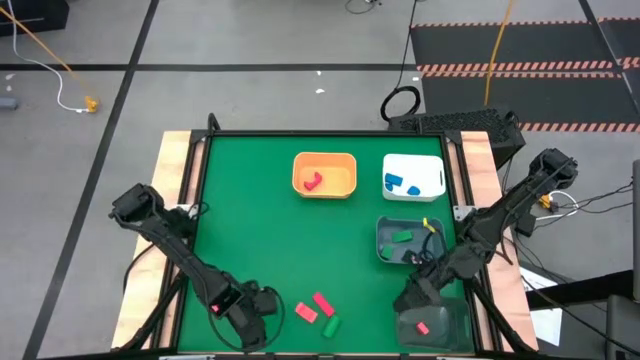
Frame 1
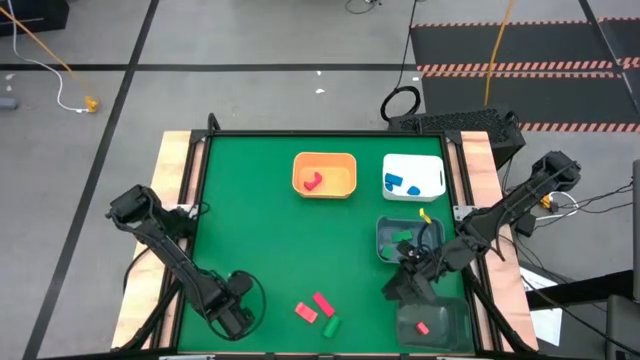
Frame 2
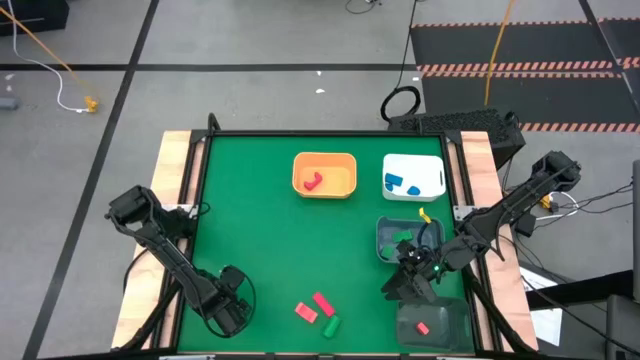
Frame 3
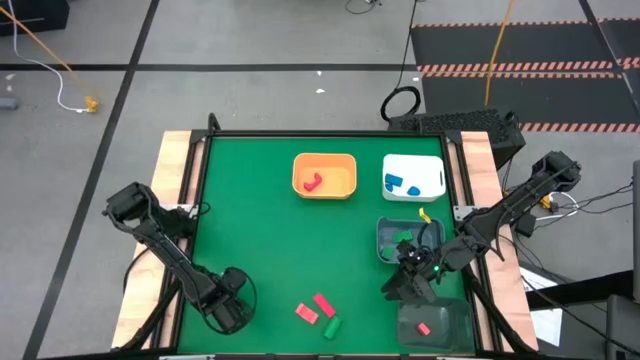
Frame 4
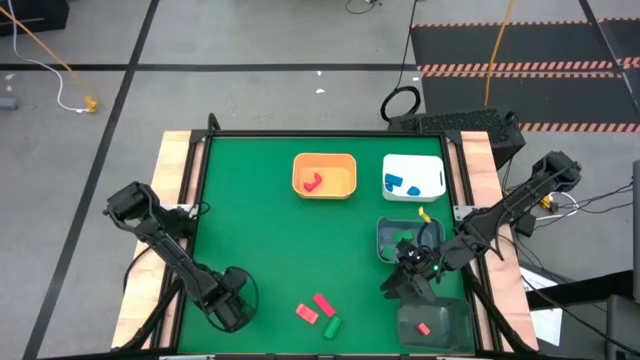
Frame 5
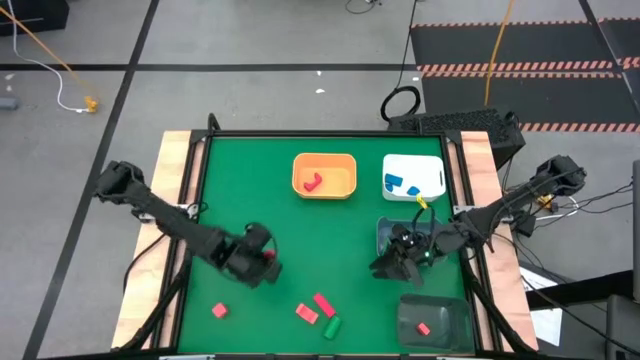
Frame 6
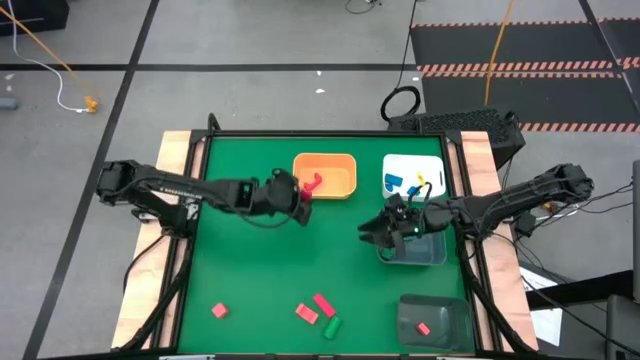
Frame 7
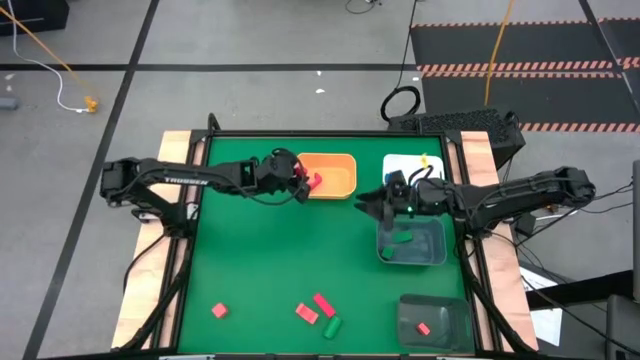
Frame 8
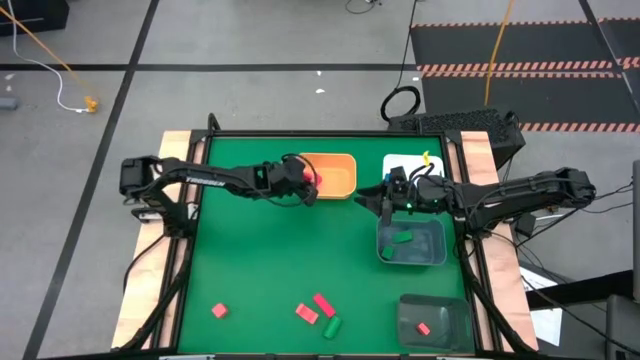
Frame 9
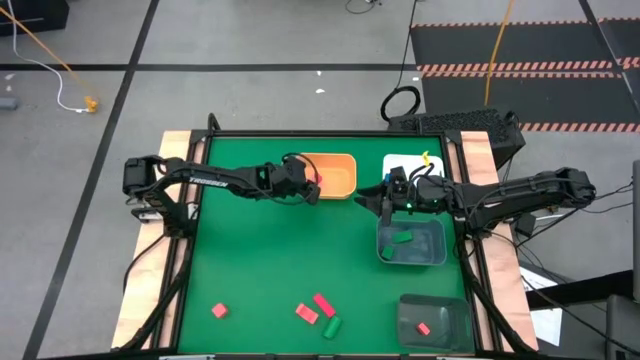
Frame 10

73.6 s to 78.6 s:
Task: Sort & place blocks by color
Put the left red block into the yellow bin

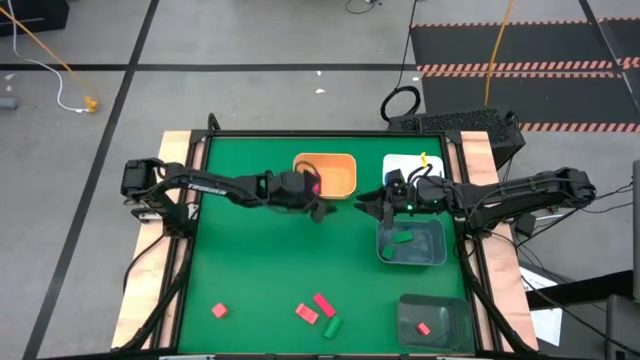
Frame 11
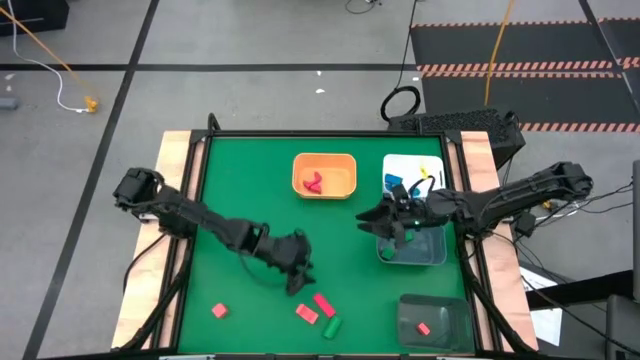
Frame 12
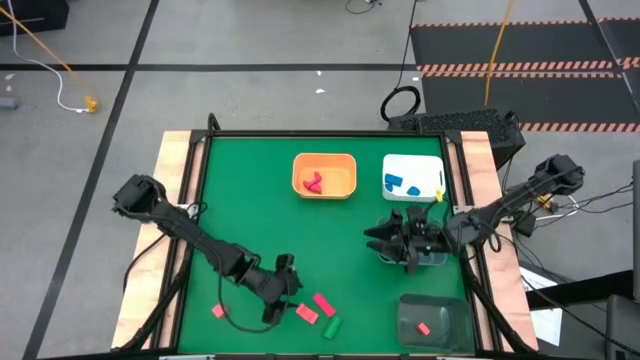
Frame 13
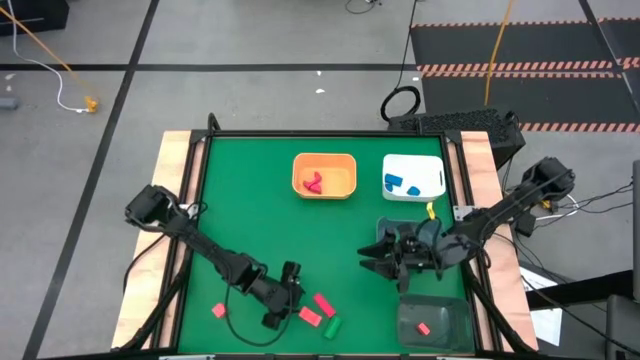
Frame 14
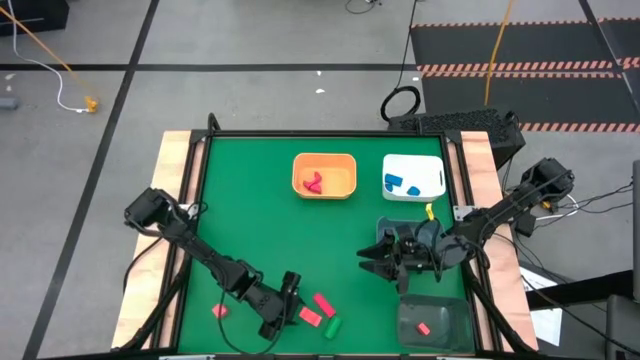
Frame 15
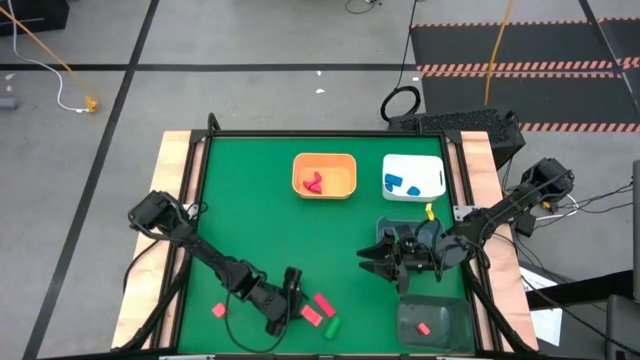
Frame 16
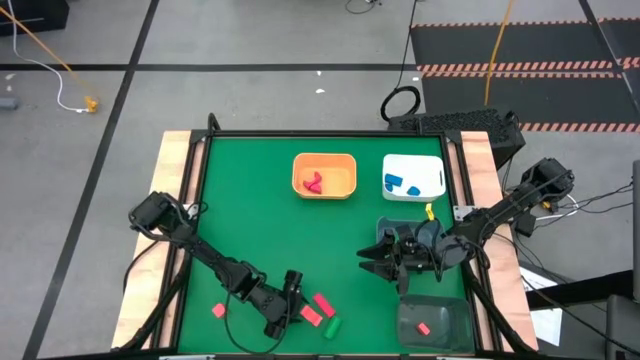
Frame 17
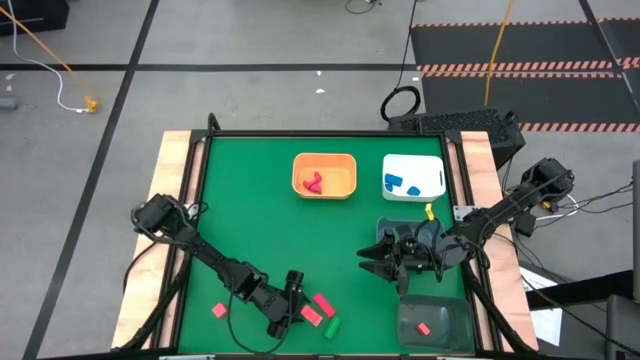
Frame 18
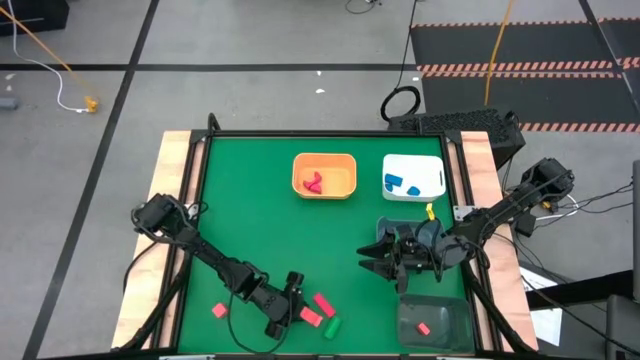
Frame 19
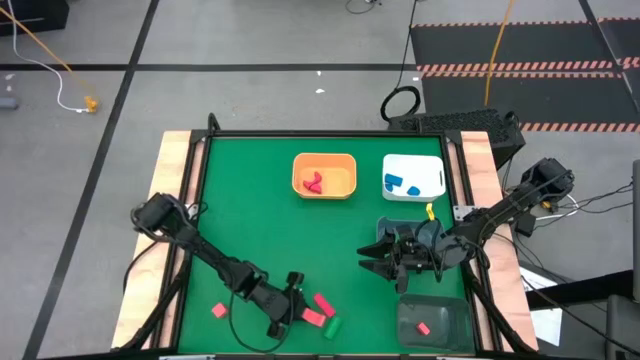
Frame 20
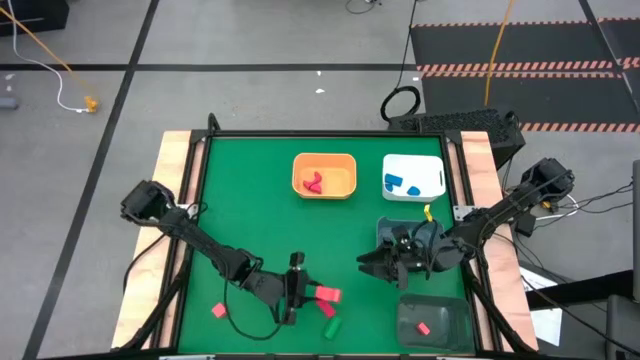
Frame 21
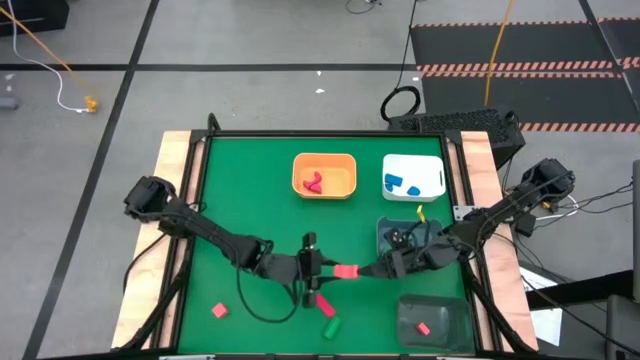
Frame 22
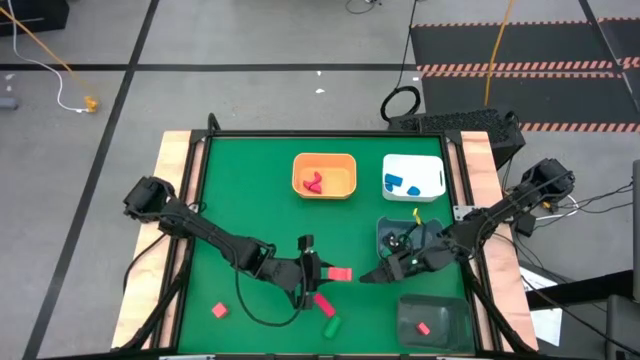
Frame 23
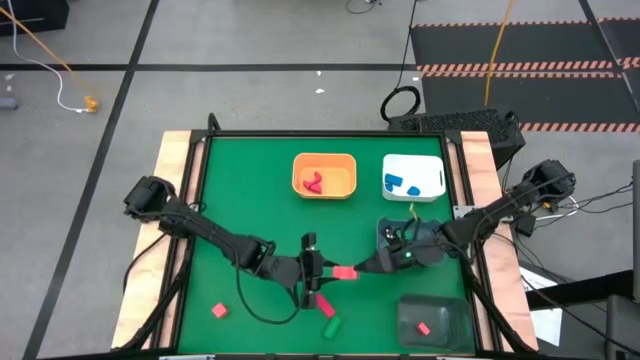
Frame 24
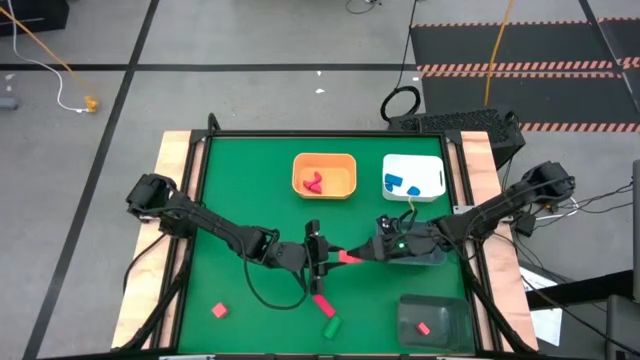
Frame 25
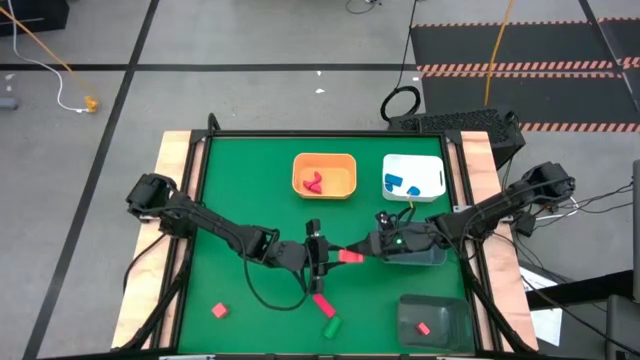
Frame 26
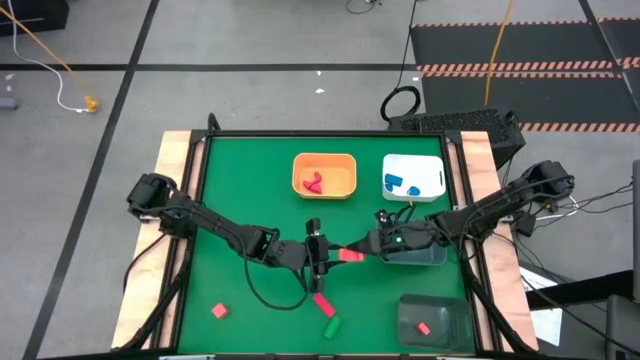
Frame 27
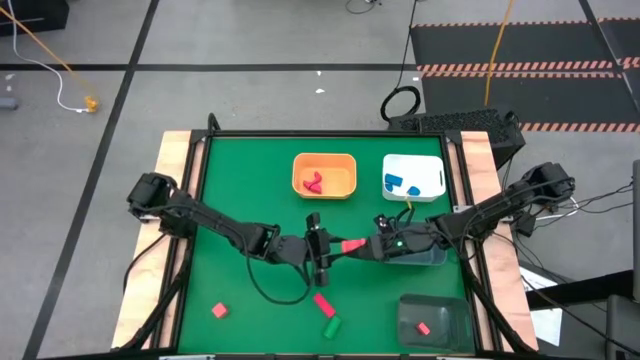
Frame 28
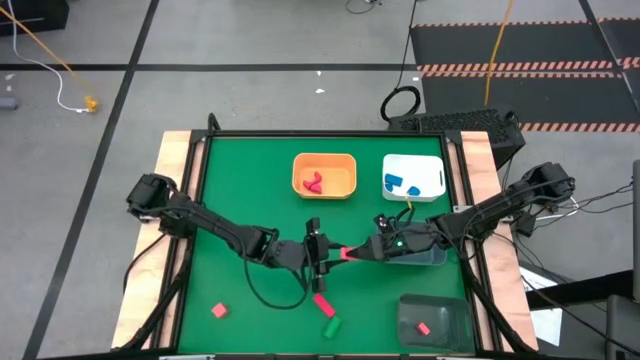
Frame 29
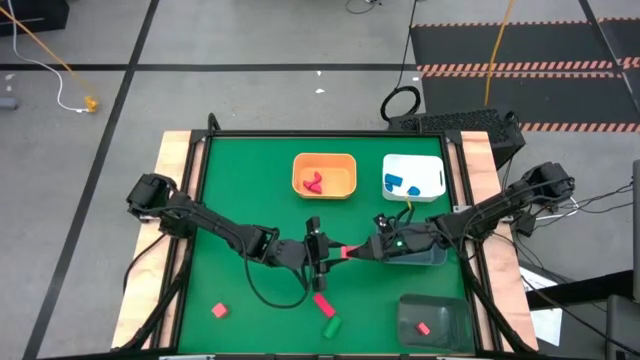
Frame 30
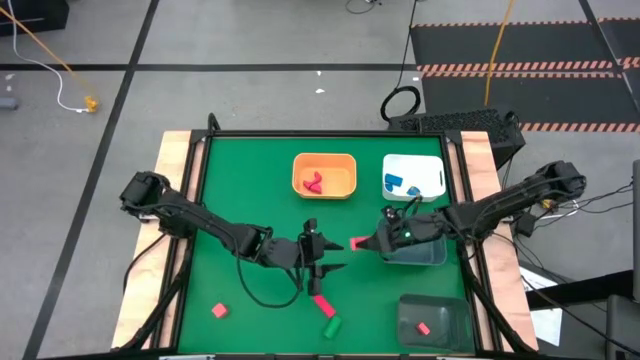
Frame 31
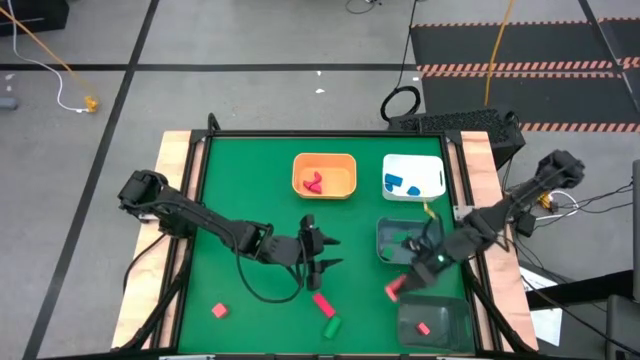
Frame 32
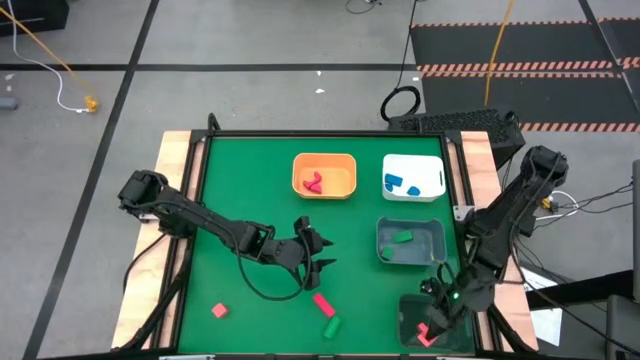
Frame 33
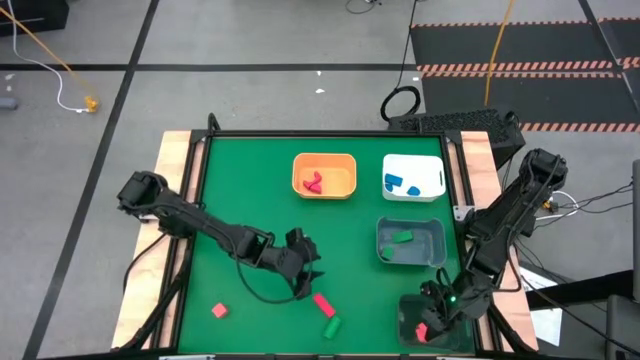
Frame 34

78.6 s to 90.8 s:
Put the right orange block into the black bin

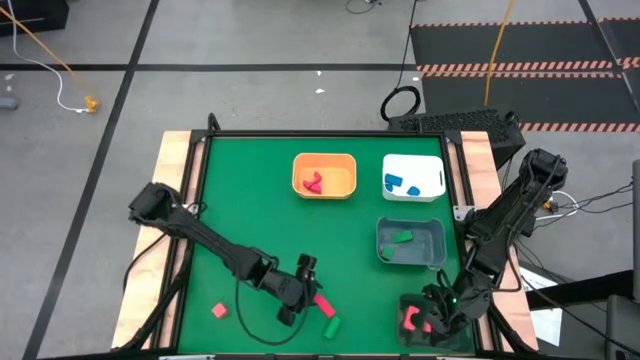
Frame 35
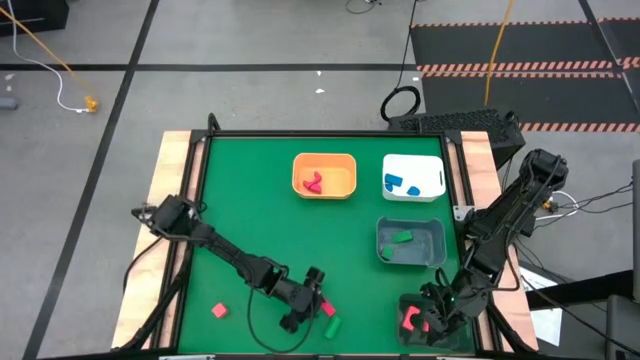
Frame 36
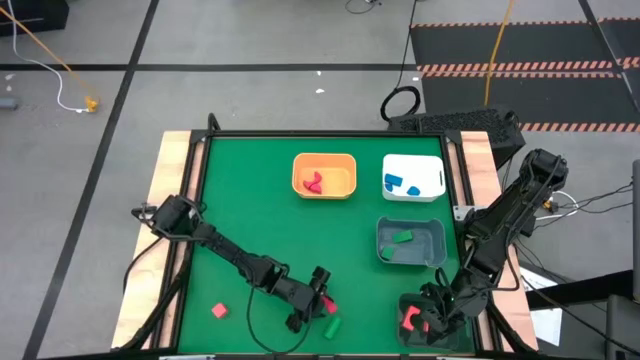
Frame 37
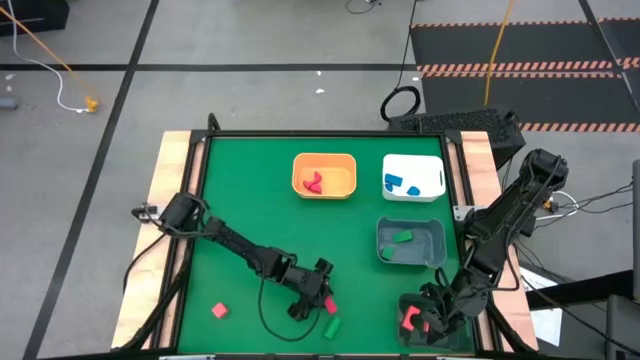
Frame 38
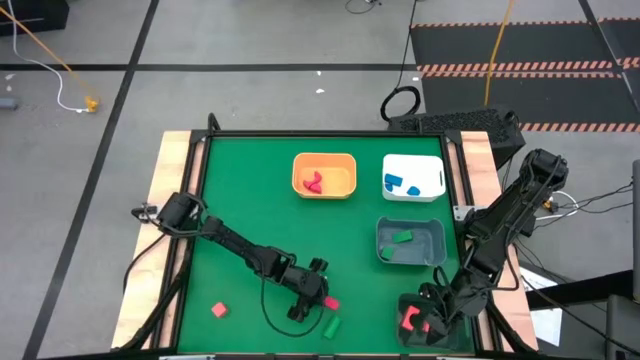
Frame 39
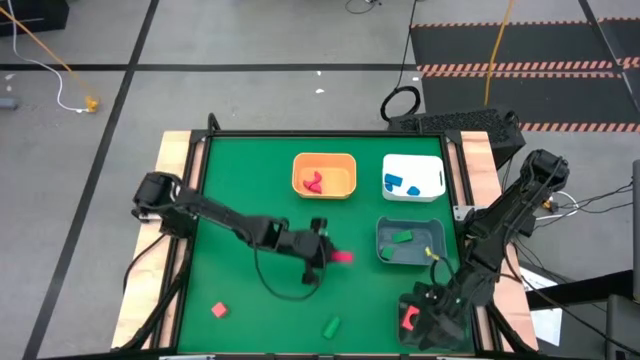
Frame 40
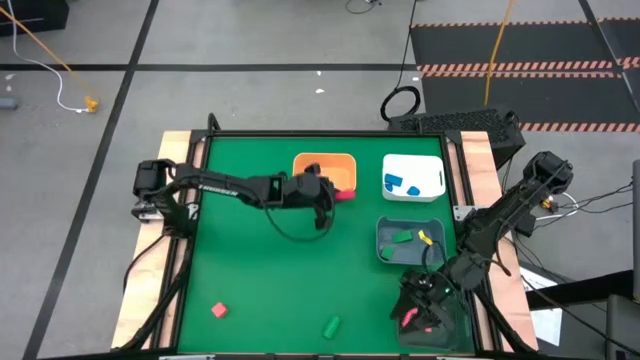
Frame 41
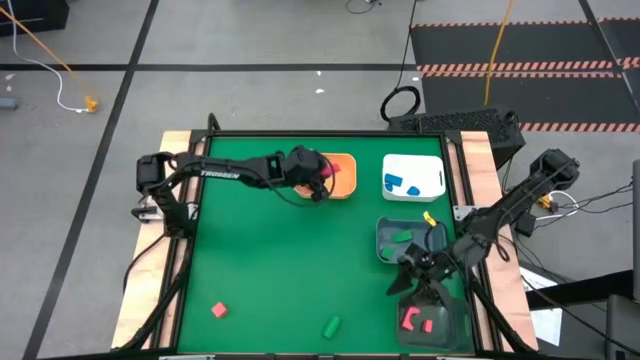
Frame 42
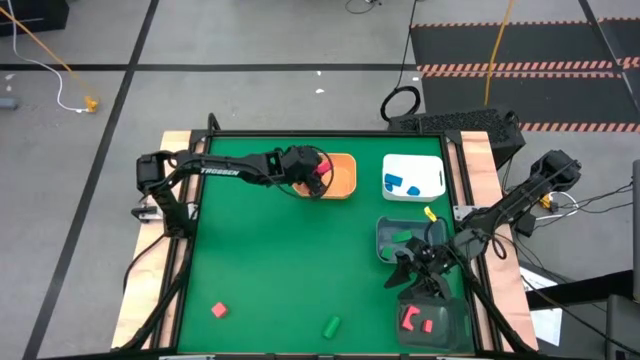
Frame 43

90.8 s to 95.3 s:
Put the left red block into the yellow bin
